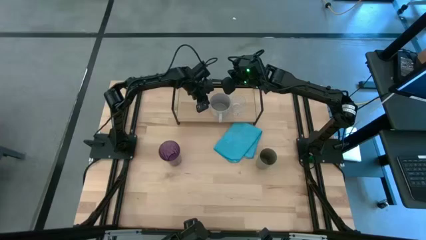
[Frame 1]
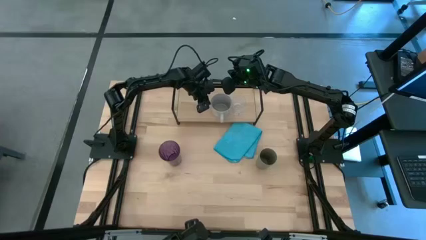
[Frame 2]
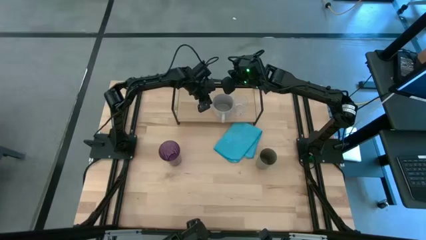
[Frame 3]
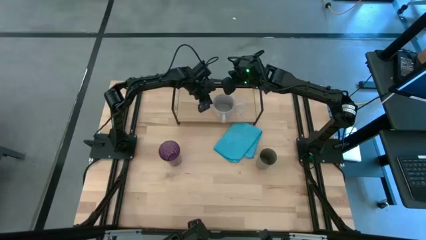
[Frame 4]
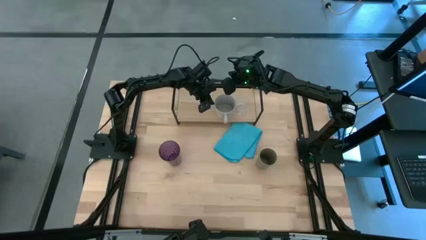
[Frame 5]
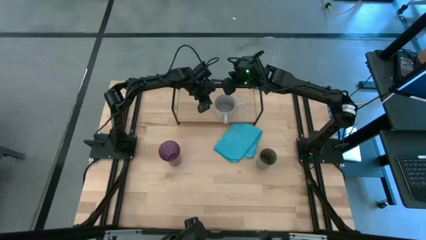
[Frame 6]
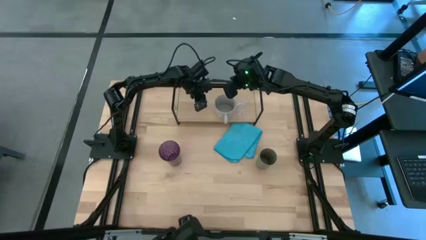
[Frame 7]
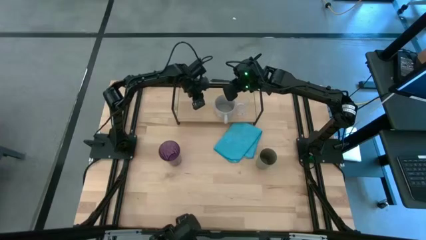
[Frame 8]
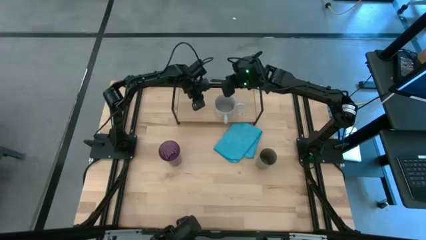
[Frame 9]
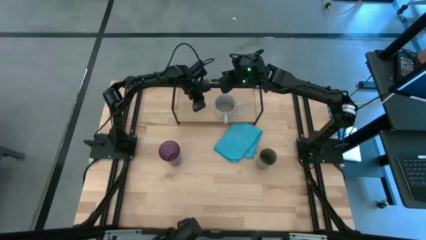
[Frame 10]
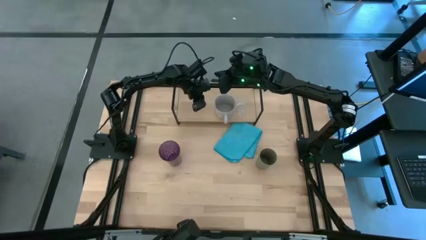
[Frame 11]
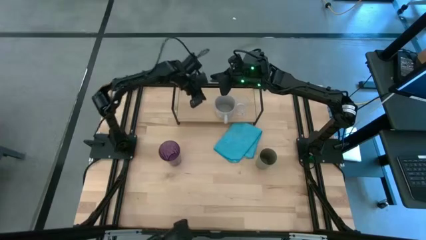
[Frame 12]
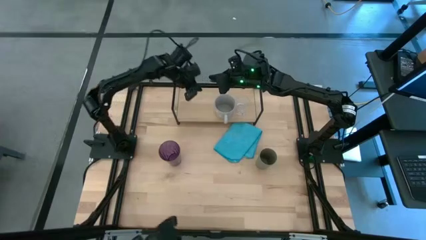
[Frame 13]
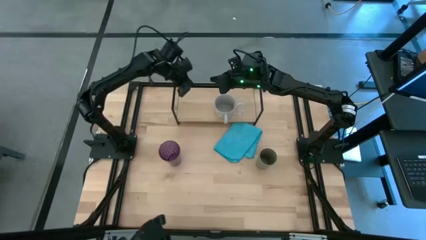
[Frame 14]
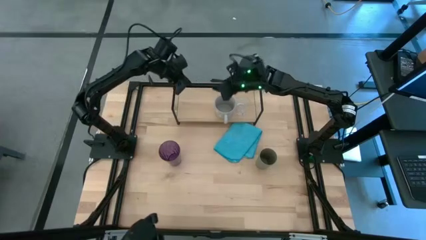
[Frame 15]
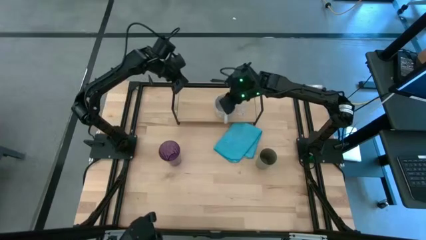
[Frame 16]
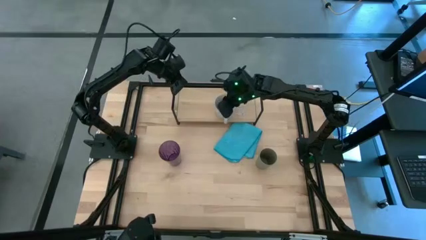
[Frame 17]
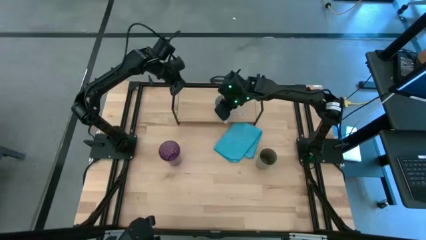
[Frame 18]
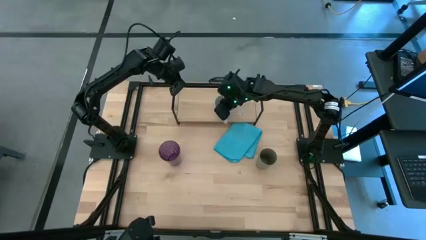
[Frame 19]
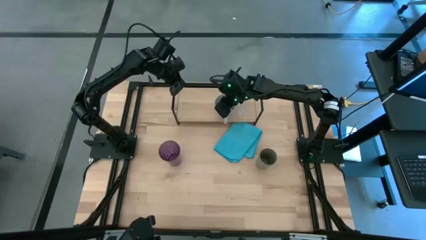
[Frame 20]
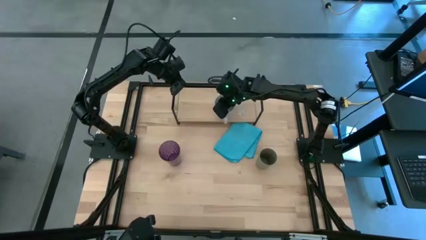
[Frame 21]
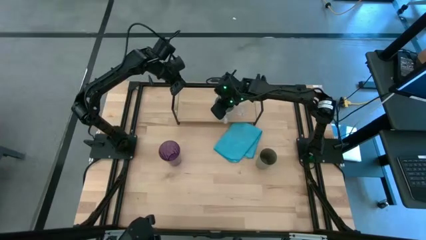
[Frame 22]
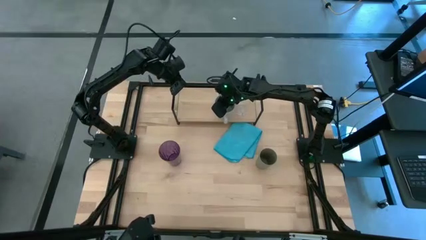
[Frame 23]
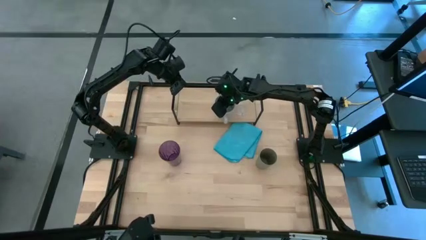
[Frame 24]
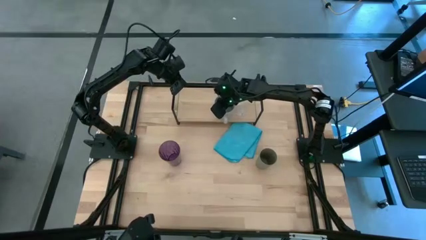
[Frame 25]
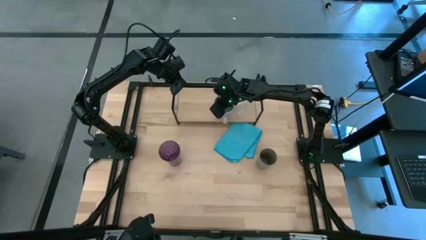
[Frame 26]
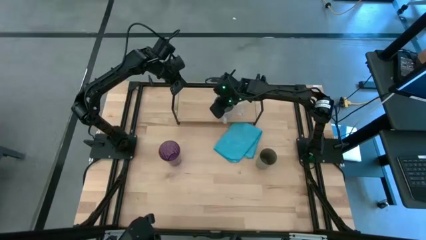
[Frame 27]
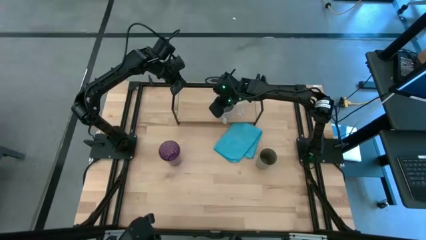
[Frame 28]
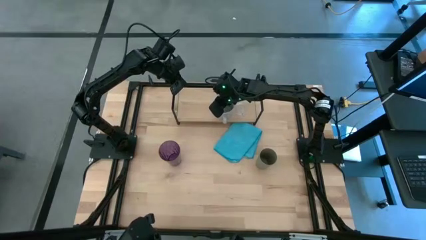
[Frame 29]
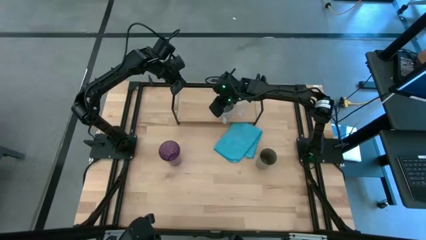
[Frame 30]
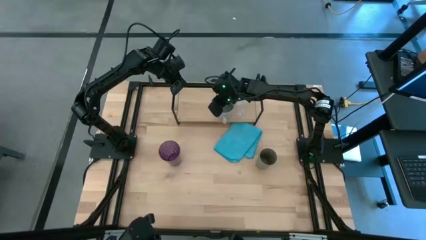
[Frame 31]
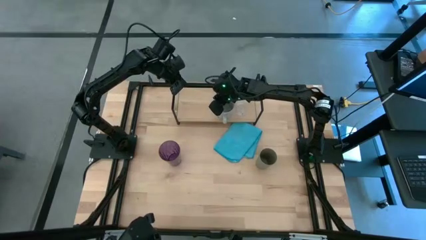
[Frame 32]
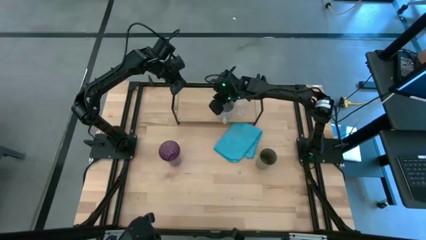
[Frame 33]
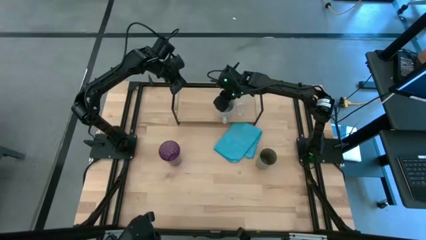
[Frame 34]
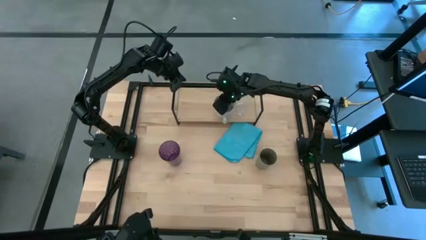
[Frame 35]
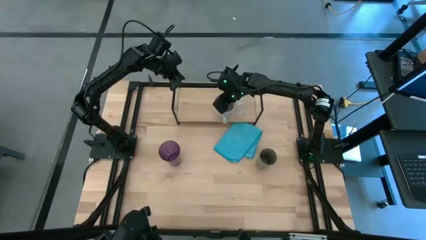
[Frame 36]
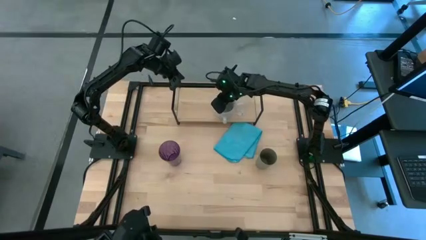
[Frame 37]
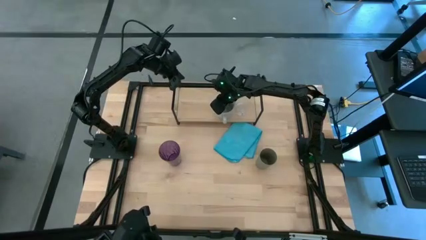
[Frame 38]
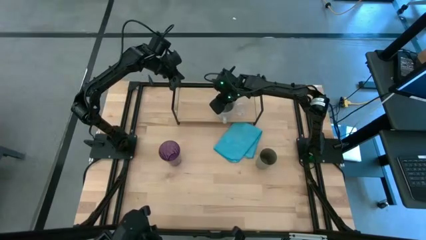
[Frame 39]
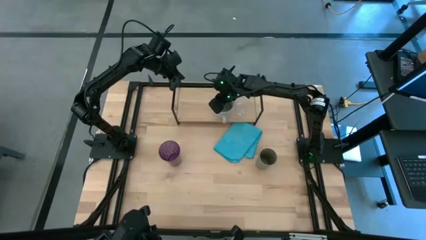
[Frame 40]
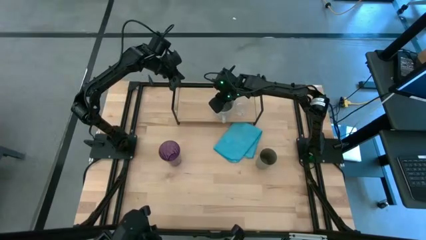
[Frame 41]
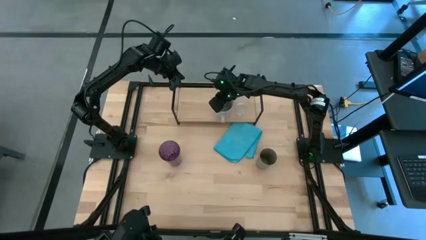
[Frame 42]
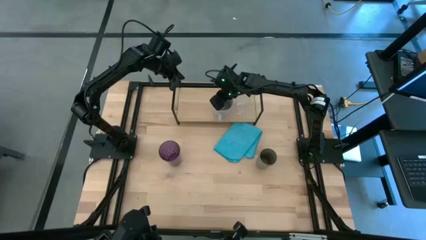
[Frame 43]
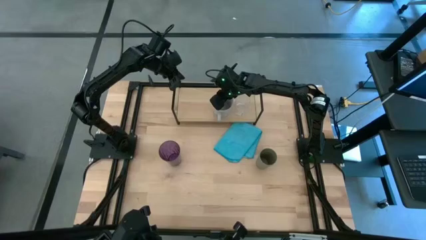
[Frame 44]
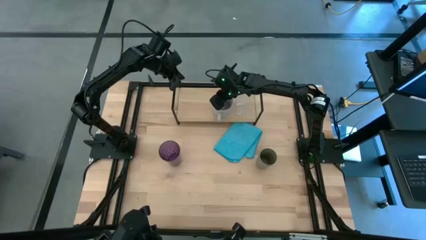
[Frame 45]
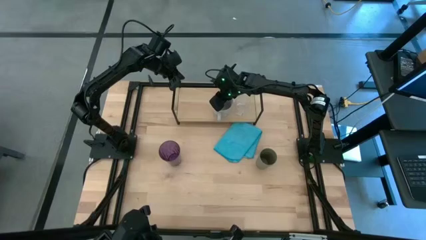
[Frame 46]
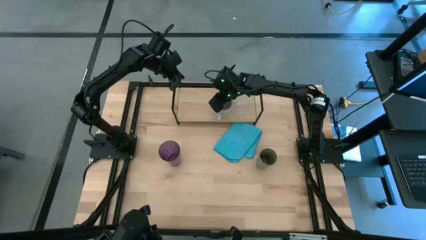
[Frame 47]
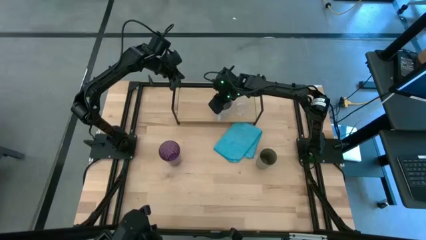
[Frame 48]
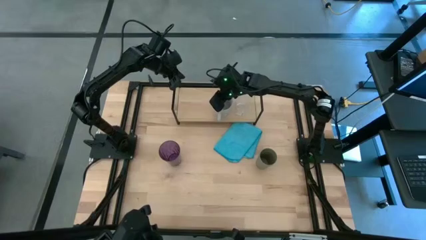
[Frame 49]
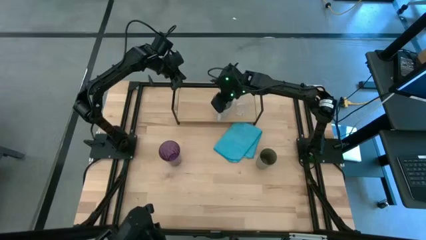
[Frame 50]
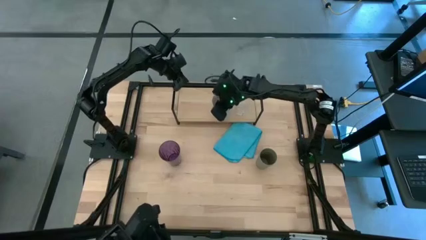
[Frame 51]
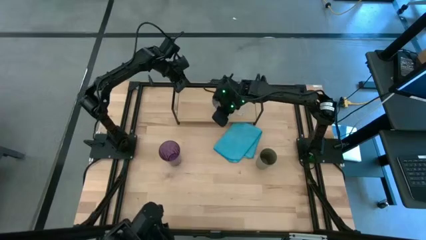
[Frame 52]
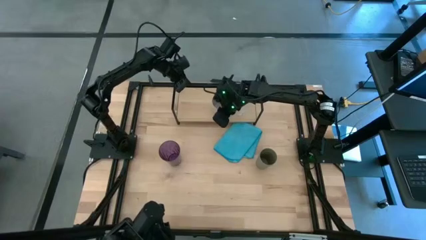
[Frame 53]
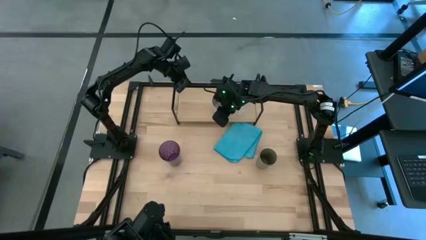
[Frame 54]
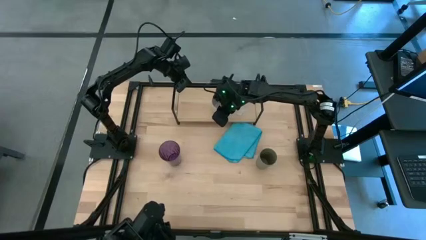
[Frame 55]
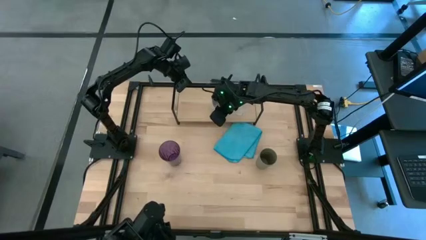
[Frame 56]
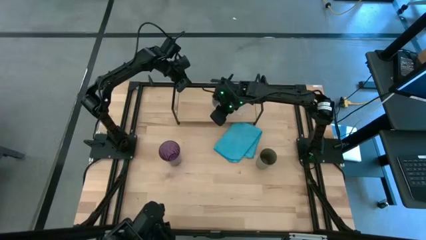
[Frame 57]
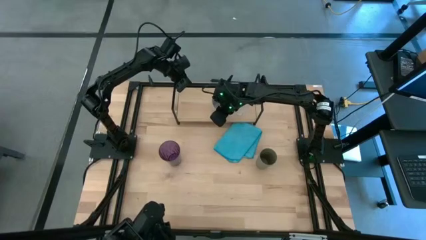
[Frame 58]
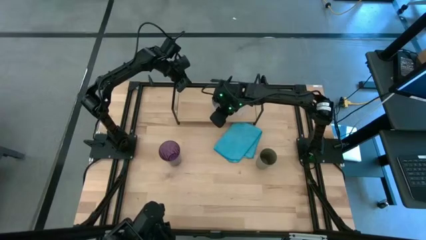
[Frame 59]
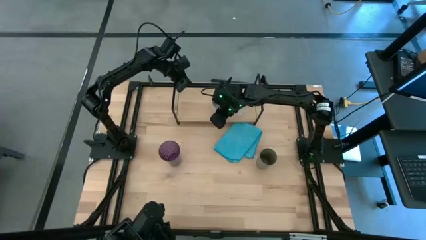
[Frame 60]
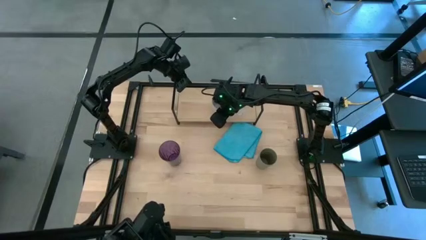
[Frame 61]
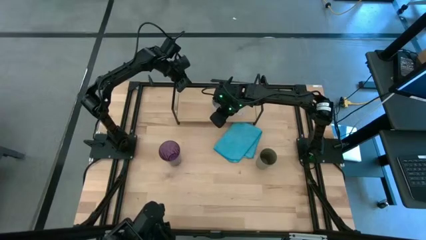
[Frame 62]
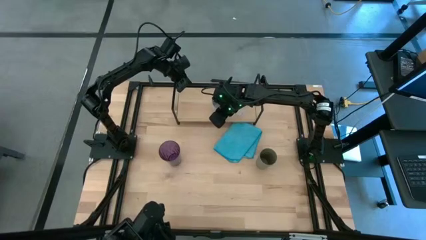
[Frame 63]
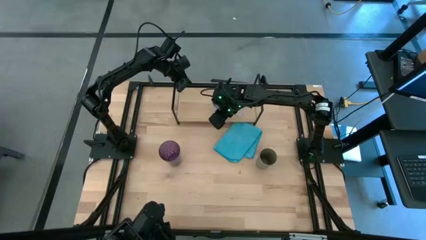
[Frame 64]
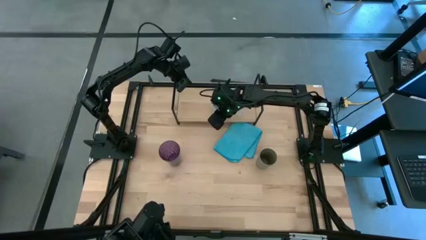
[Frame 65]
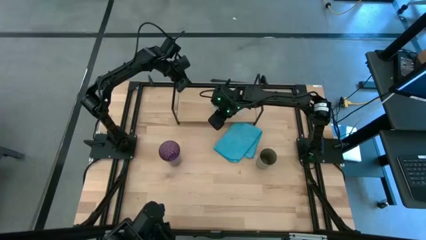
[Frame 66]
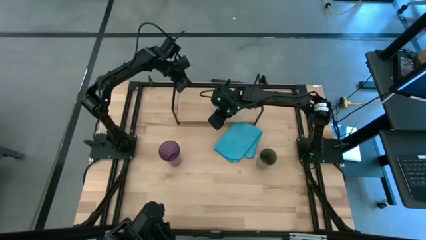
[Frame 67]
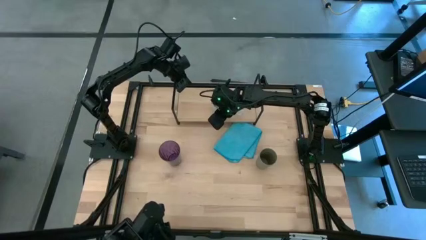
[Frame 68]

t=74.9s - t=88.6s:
Task: Stack small to large cups/mugs on shelf
Put the gray mug on the shelf
